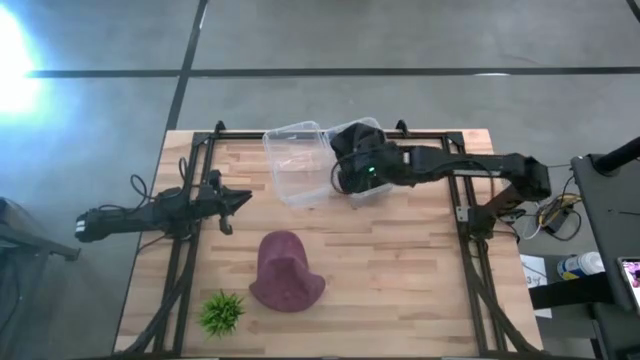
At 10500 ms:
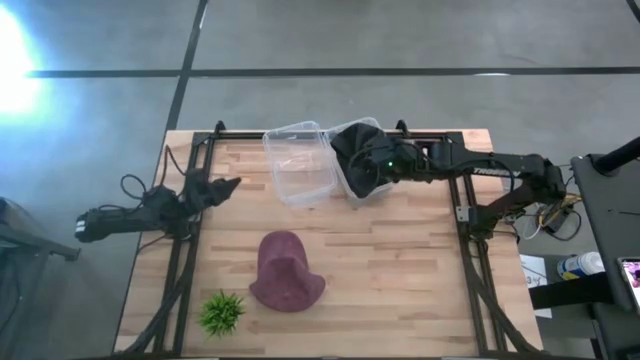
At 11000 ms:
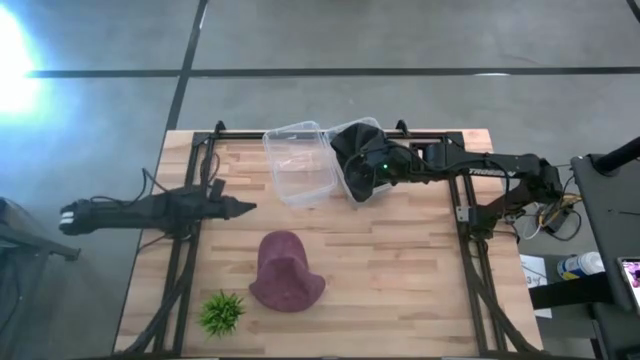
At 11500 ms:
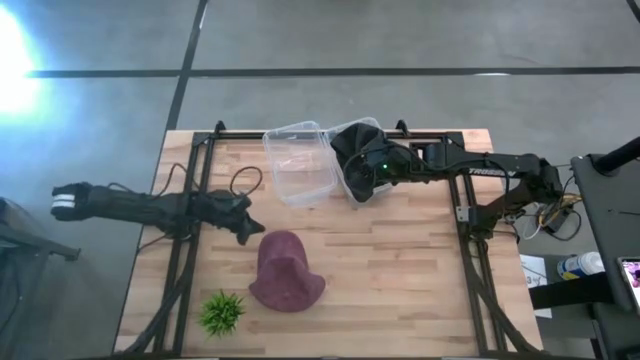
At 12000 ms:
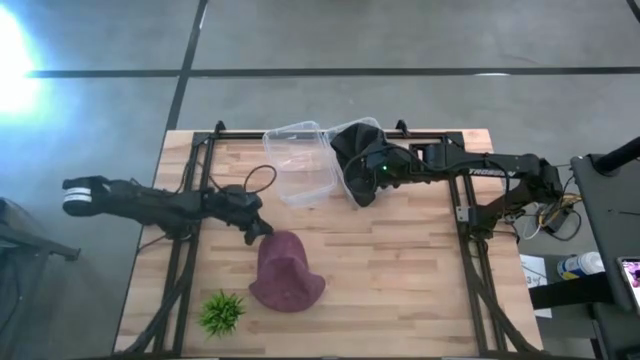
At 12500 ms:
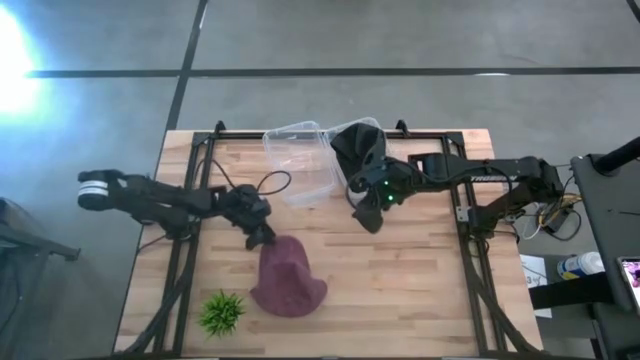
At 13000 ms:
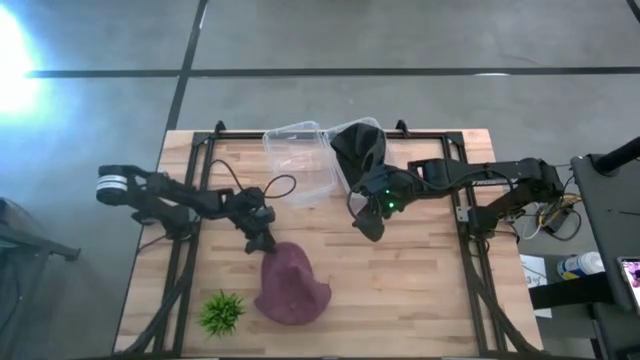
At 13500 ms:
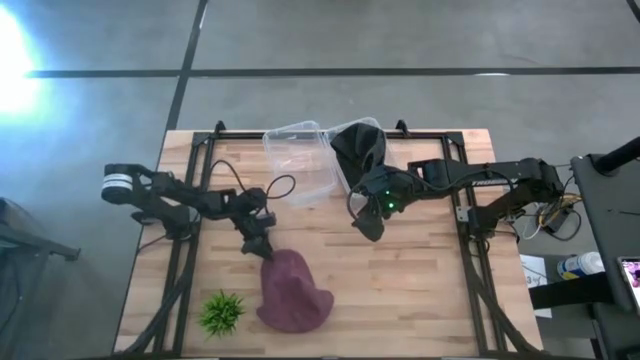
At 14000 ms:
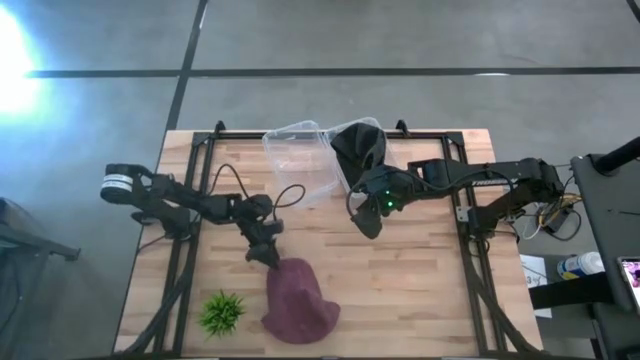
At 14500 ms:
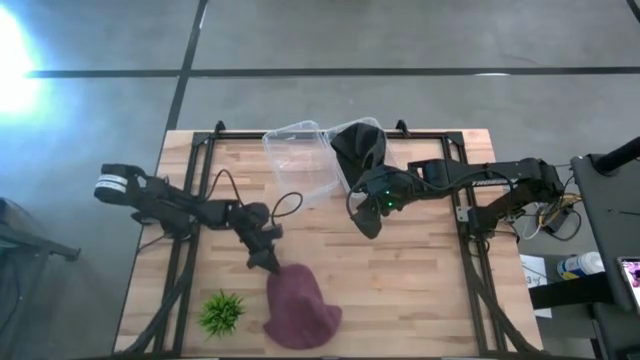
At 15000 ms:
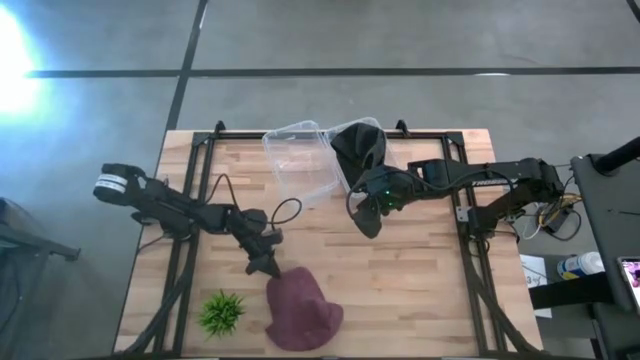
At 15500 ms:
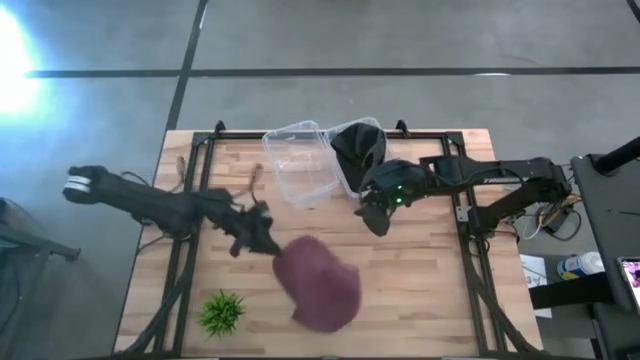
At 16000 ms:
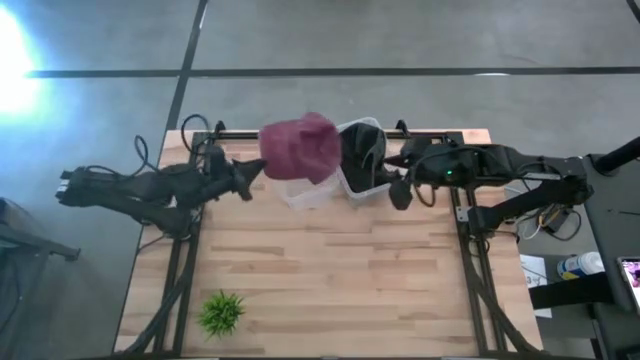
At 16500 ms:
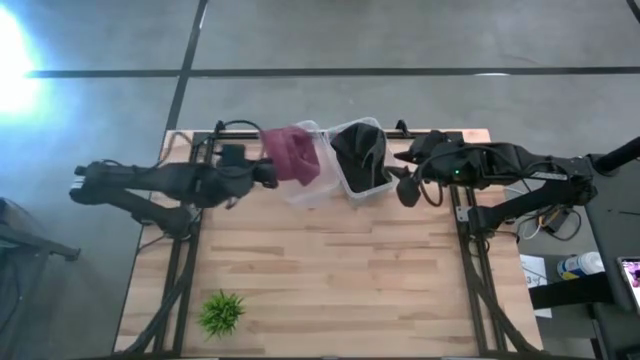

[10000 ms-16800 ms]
Task: Pick & Place hat
Put the red cap into the left transparent bin

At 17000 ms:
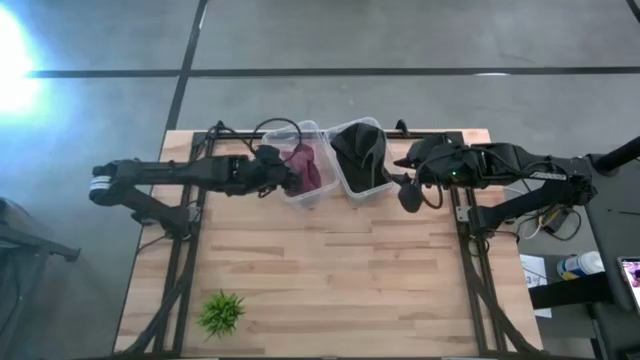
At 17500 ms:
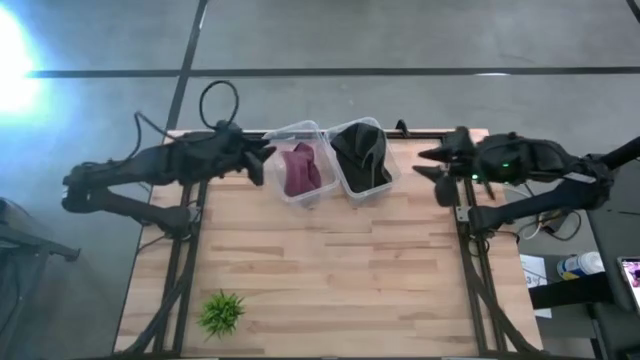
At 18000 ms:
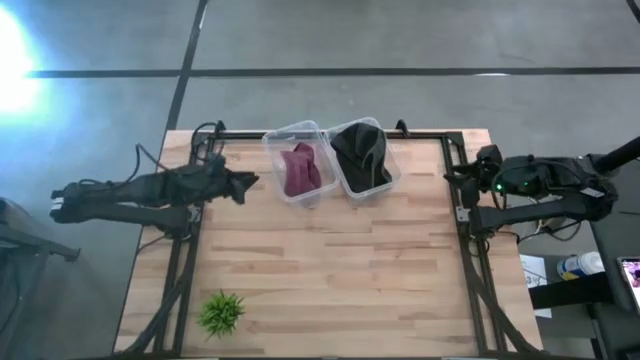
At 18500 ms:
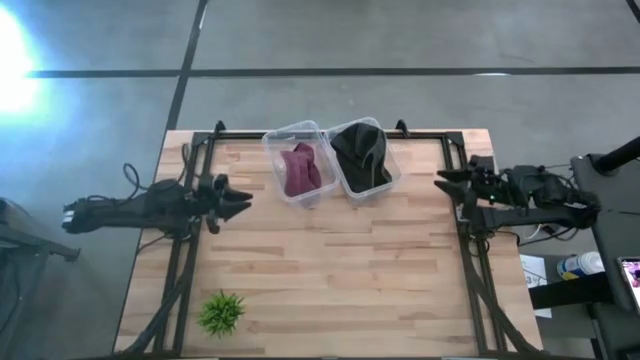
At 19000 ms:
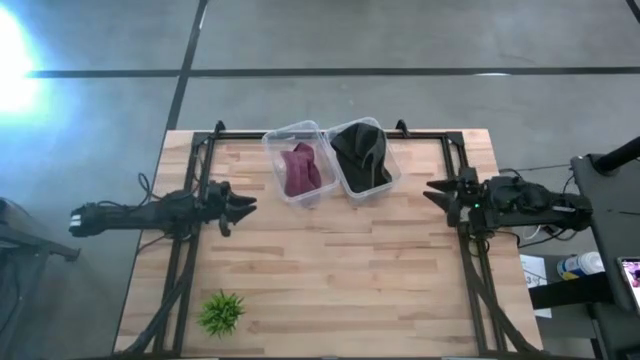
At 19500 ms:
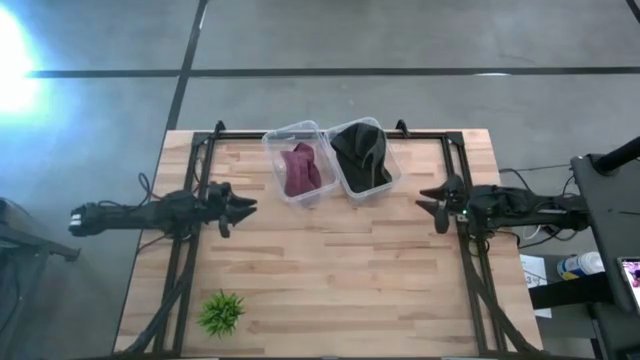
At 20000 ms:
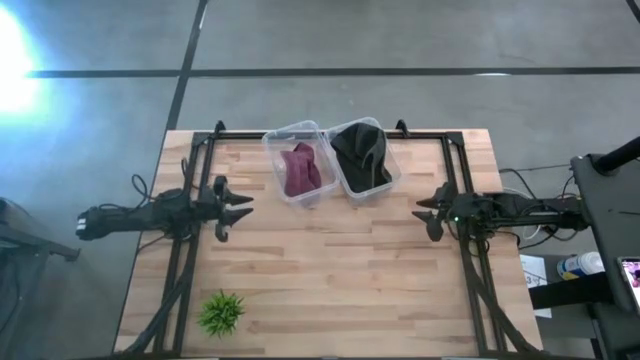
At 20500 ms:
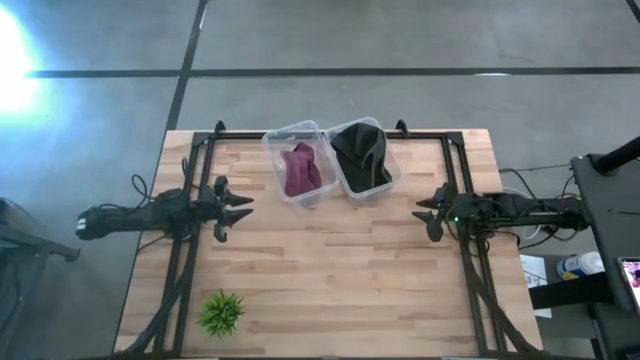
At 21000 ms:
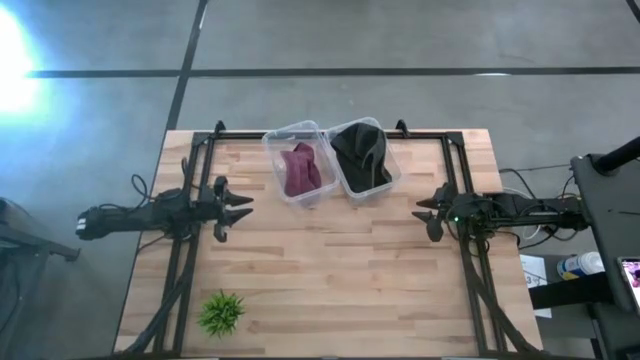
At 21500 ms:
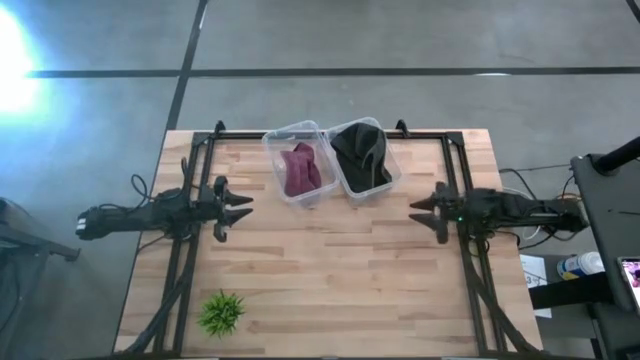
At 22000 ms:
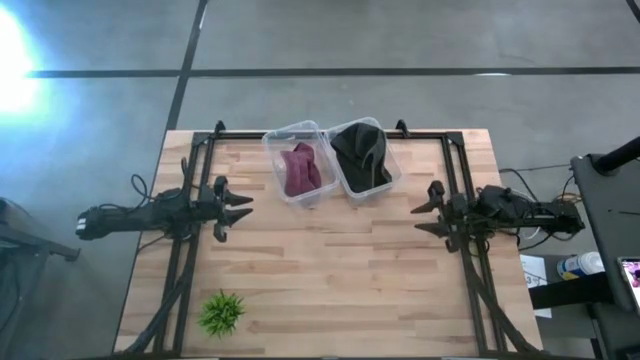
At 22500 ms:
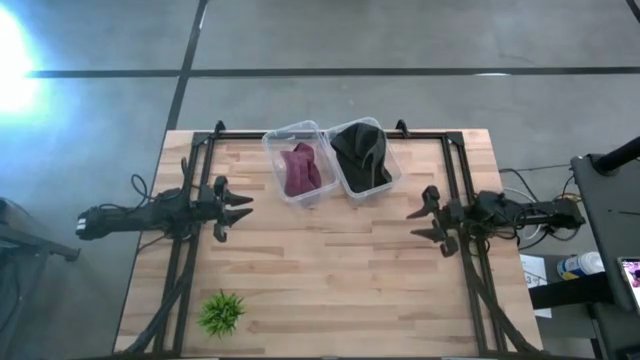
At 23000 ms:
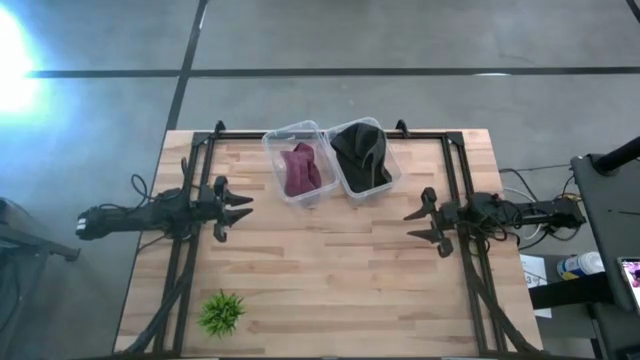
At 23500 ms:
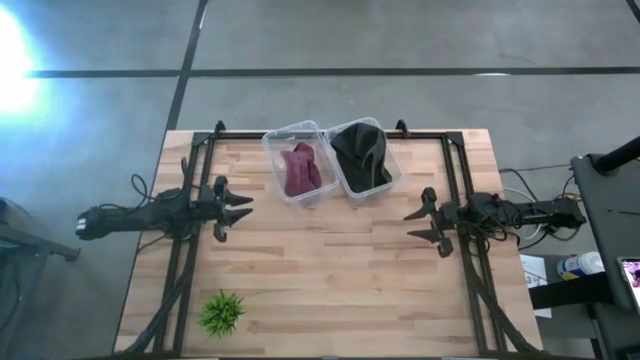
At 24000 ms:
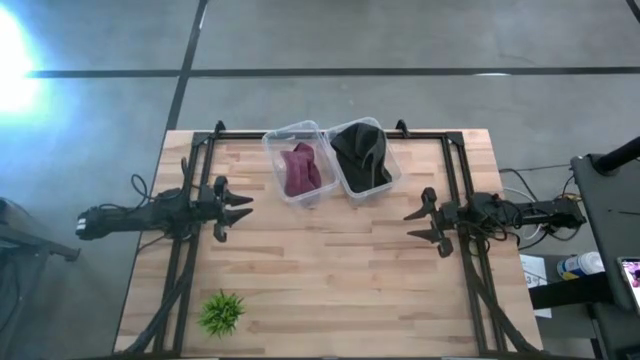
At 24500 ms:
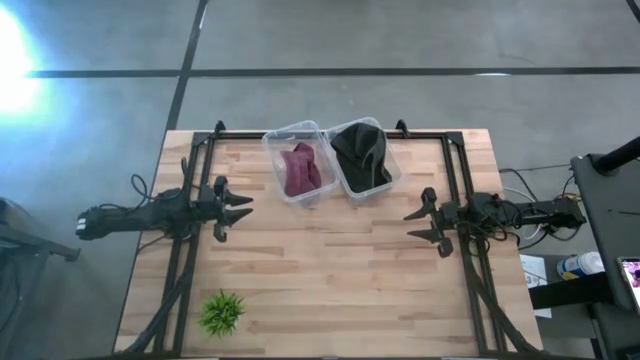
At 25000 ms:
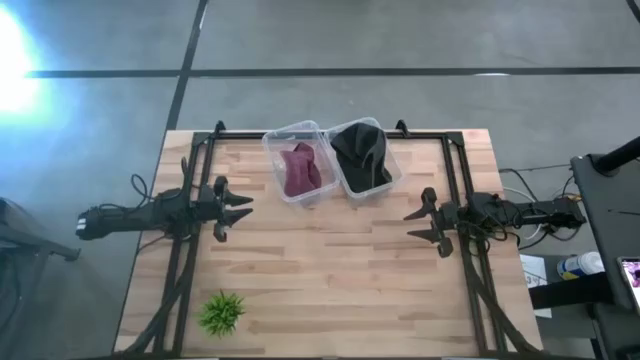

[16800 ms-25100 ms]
Return to Home Position

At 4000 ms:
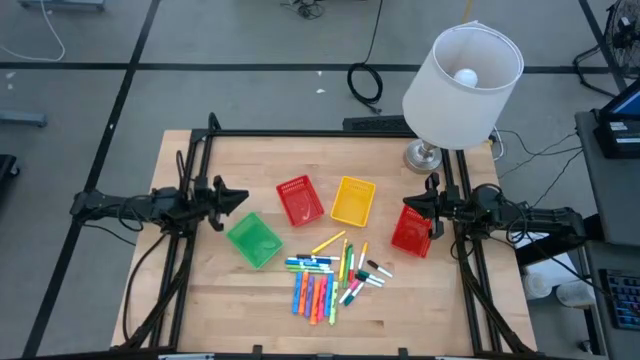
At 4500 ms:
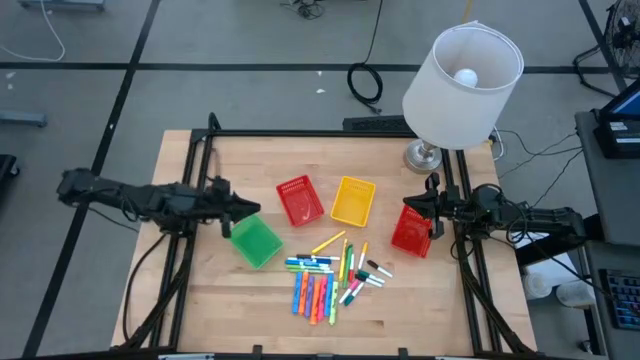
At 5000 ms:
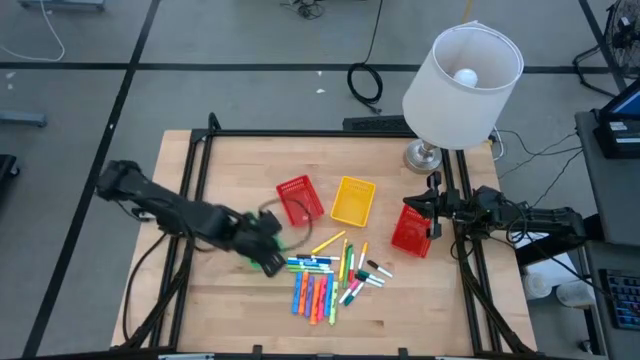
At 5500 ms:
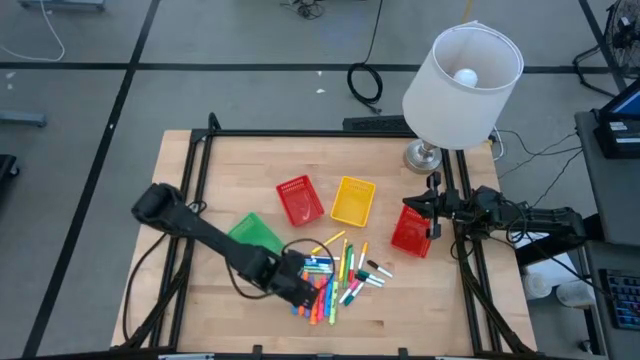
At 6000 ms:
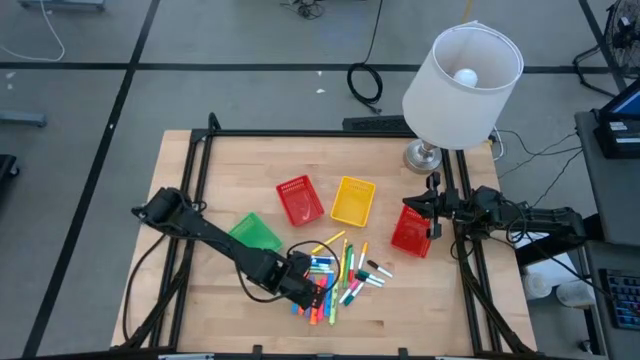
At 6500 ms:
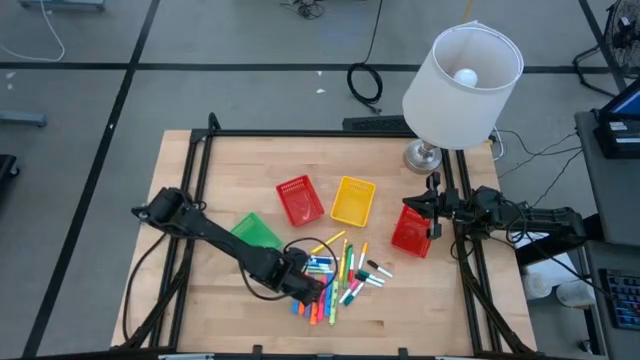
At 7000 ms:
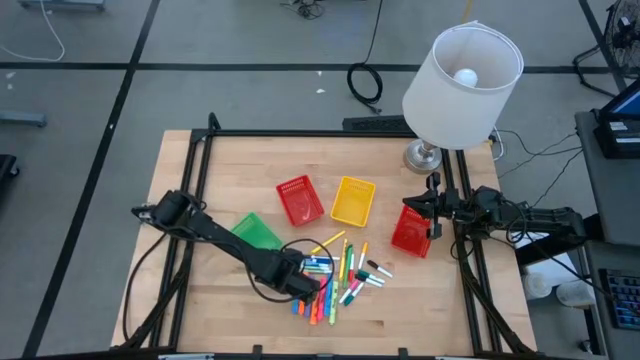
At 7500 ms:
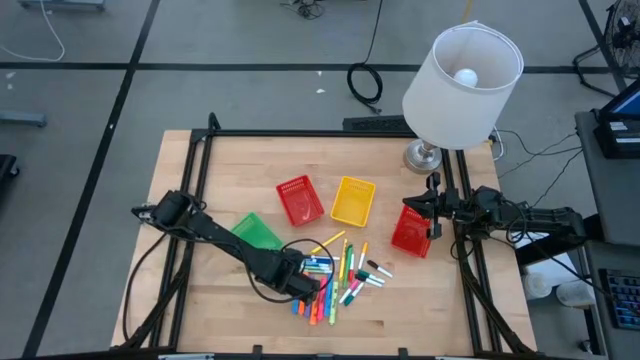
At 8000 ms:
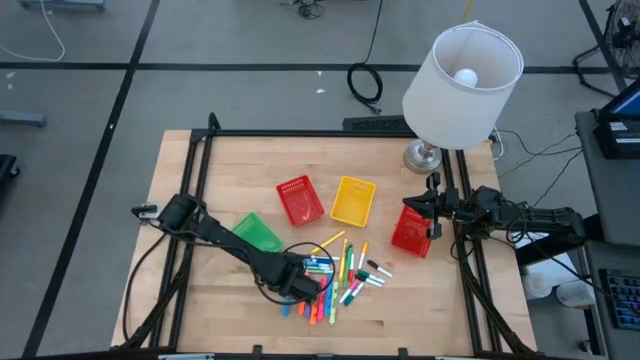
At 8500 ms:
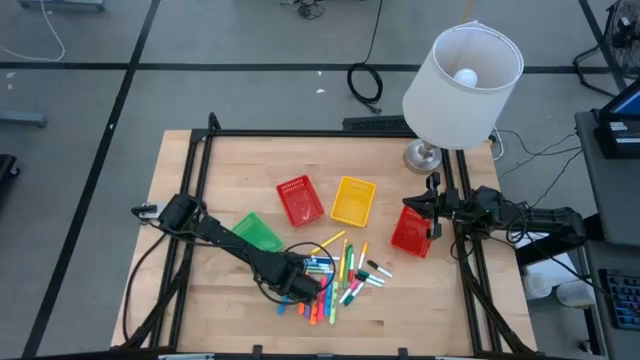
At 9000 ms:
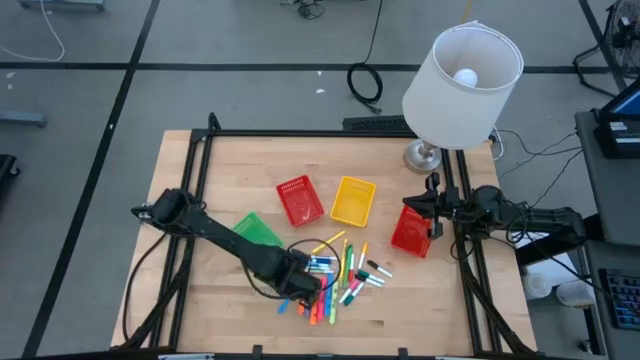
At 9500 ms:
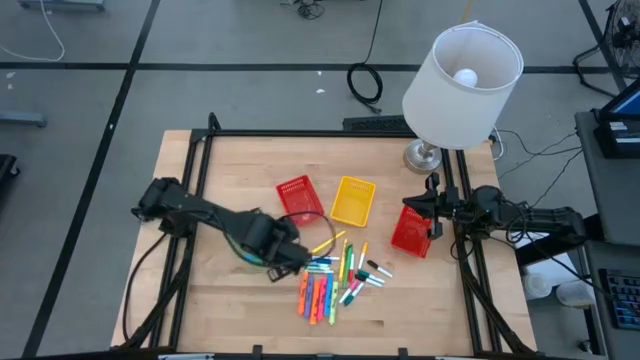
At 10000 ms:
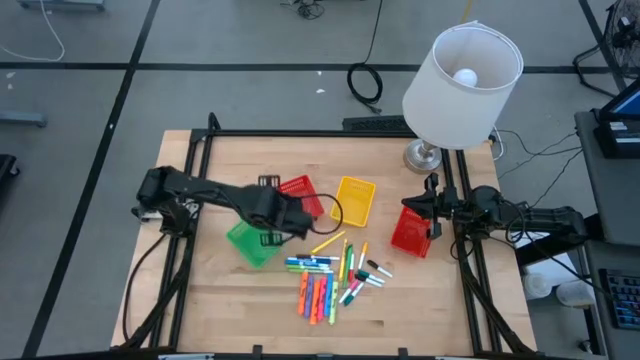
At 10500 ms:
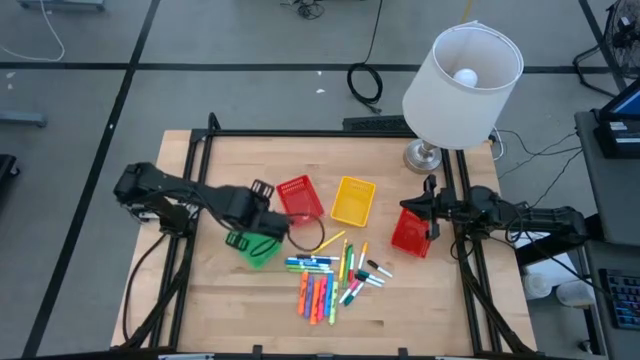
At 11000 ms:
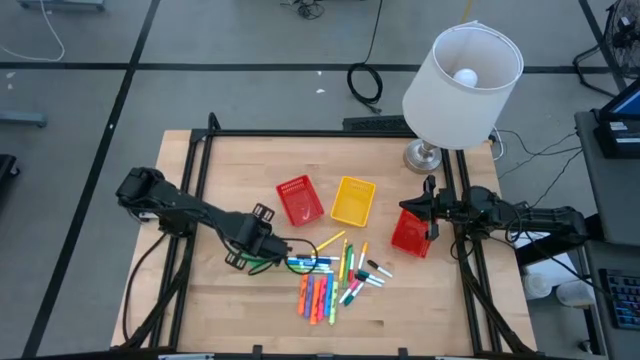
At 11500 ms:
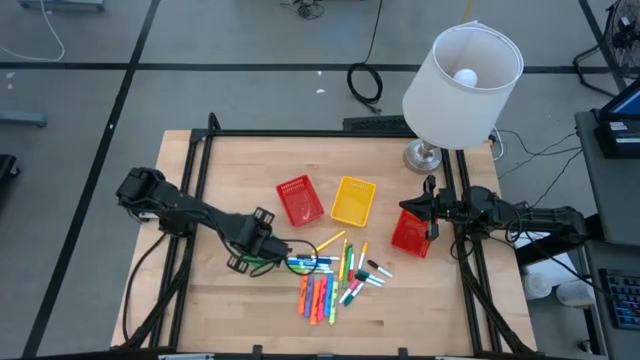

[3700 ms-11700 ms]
Task: Pick & Place Markers
Put the left blue highlighter into the green bin
